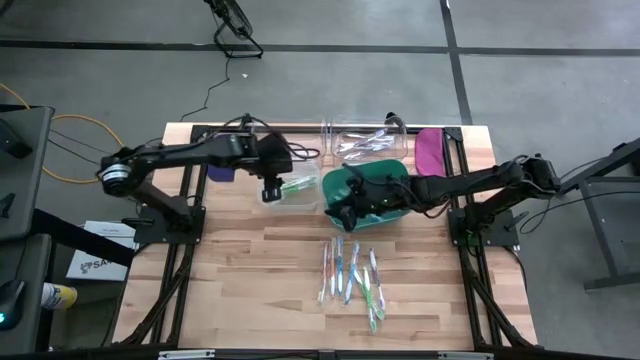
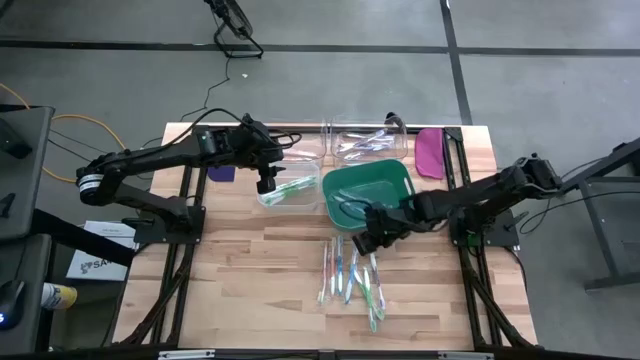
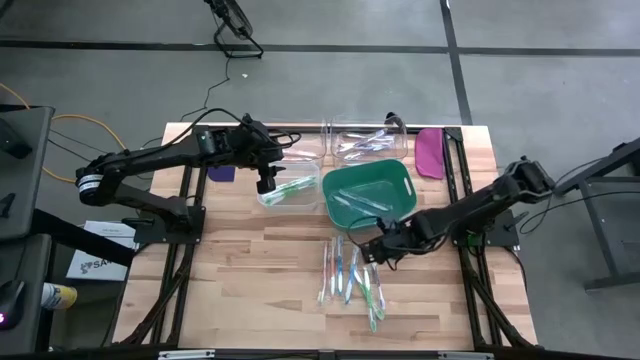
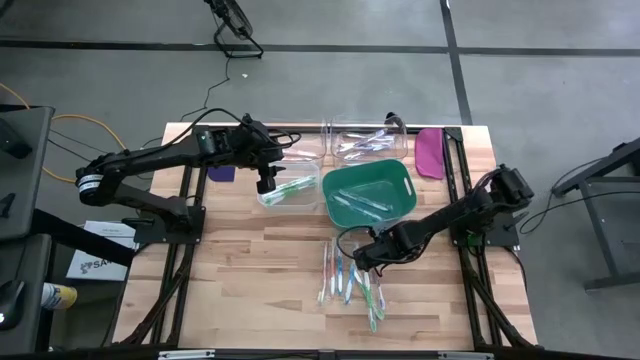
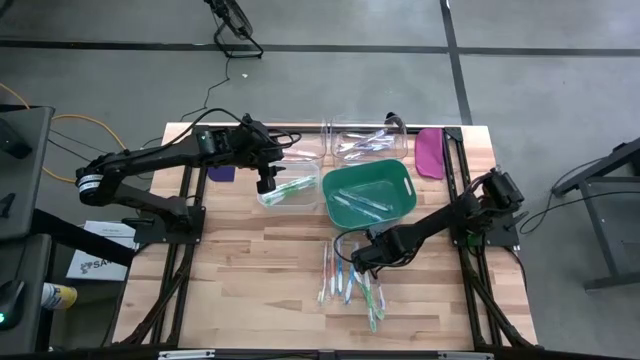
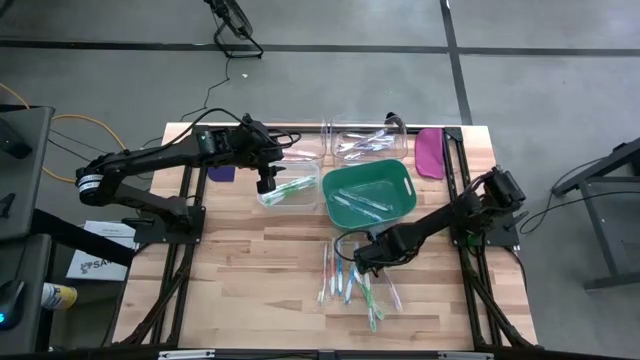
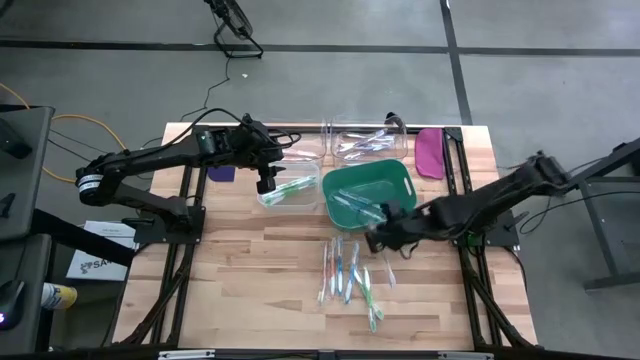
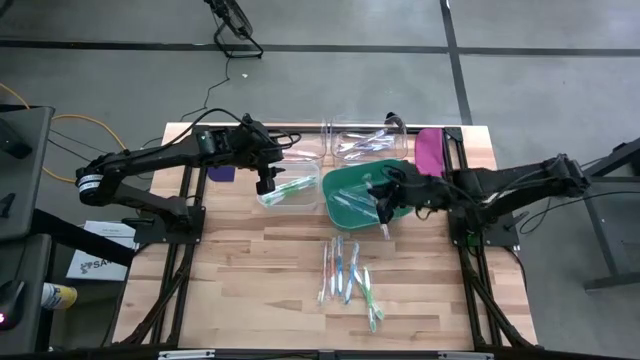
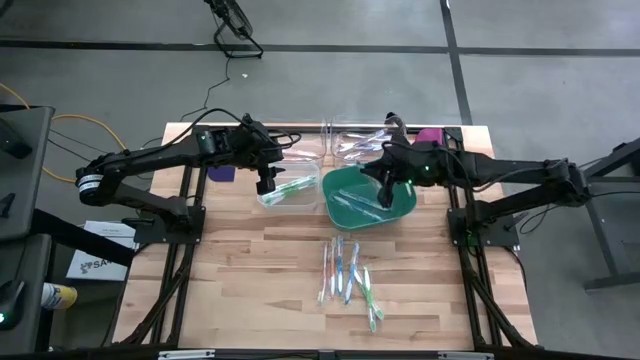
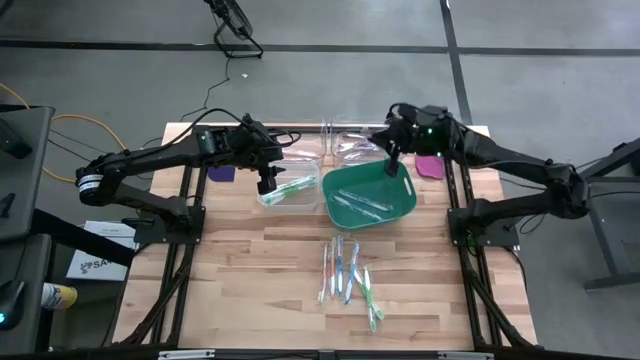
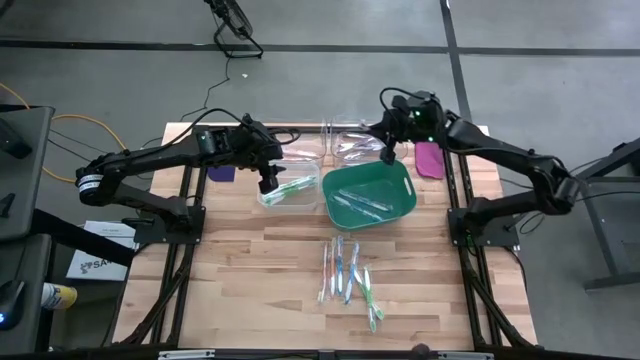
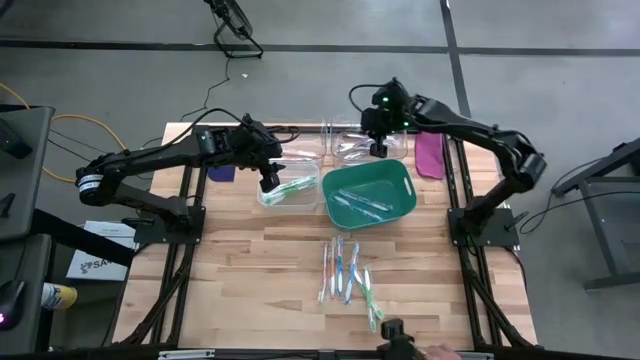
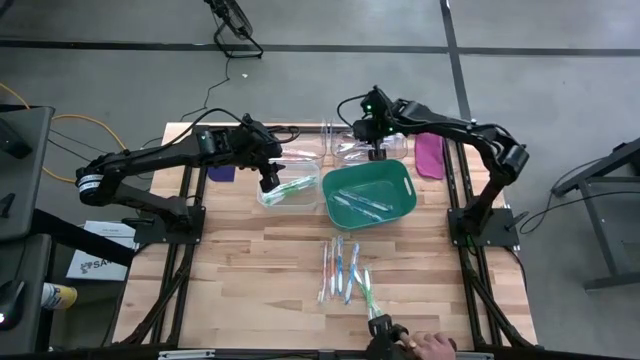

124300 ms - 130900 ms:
Task: Pick & Place Toothbrushes
Put the purple toothbrush into the right transparent bin

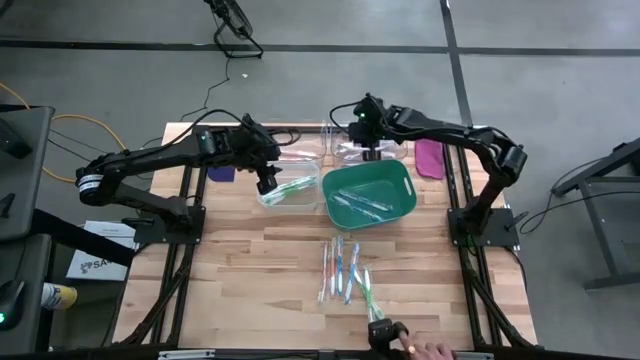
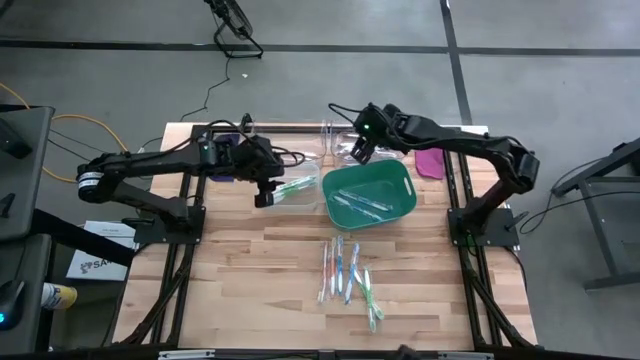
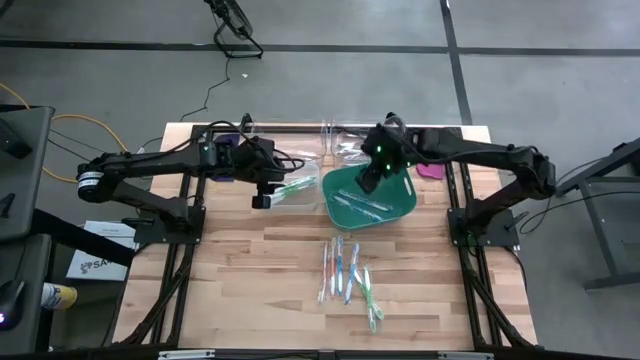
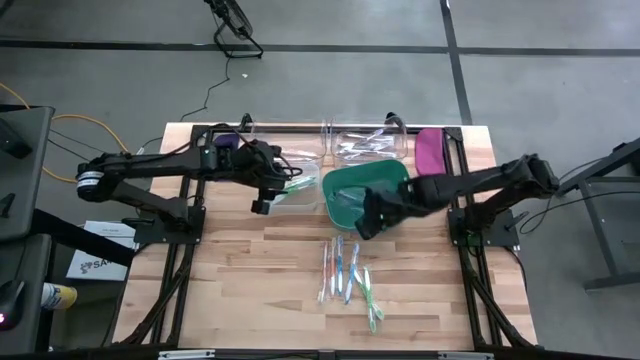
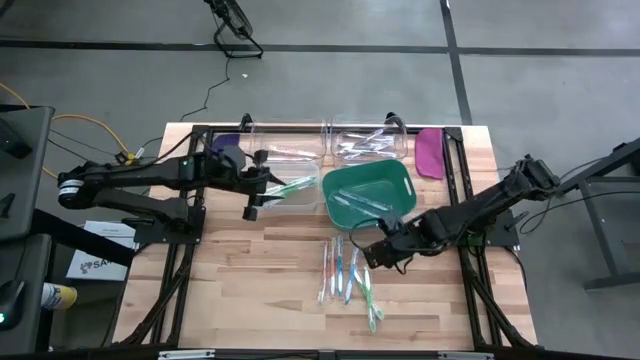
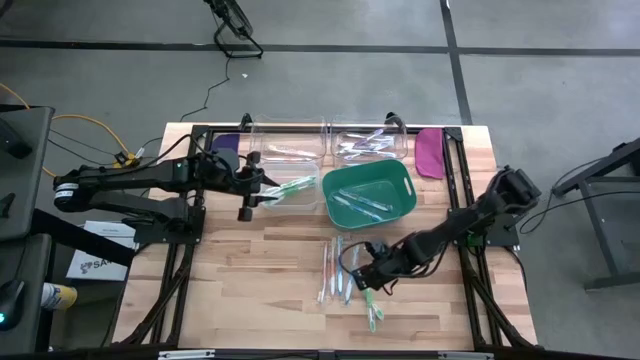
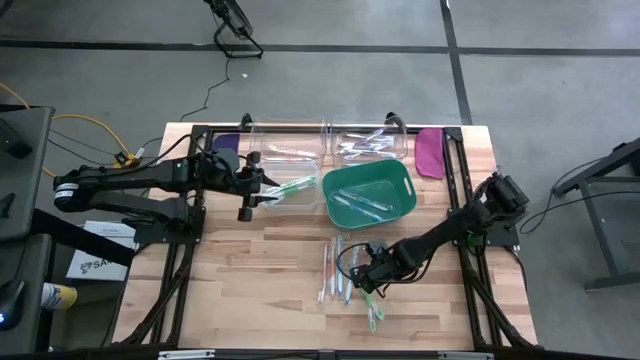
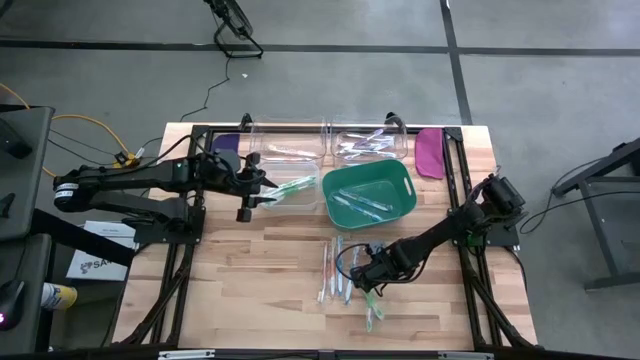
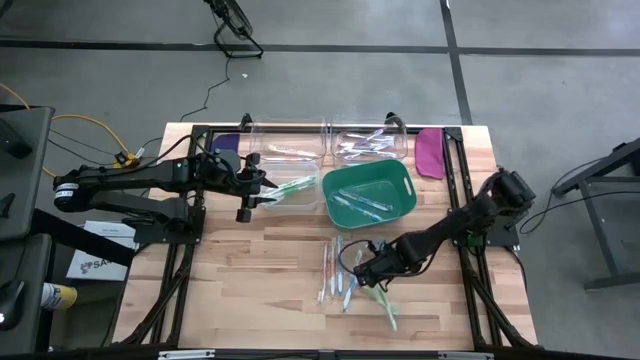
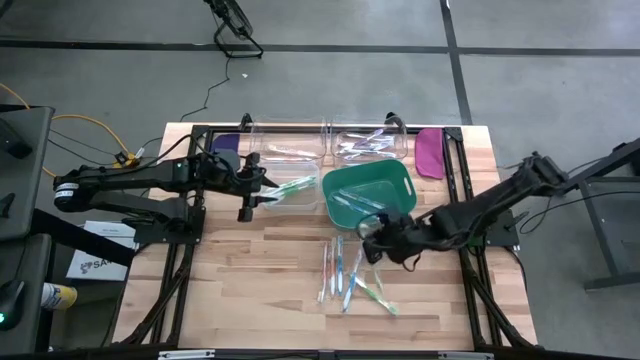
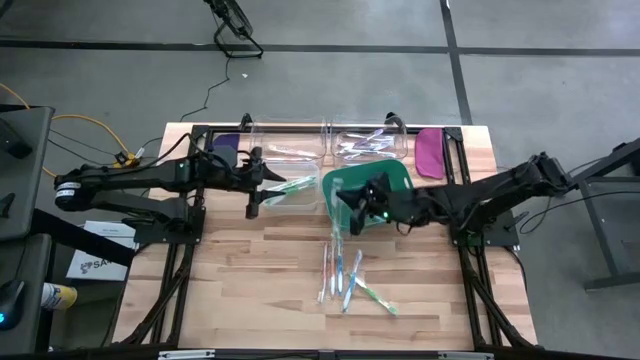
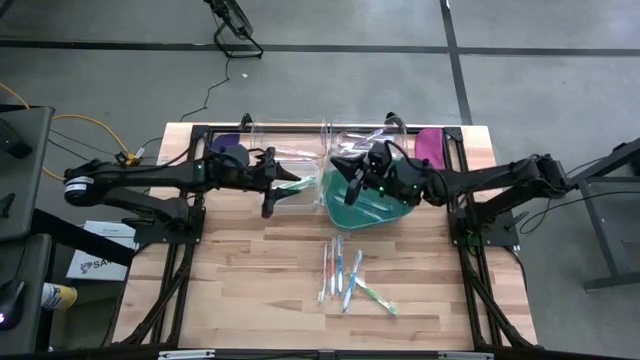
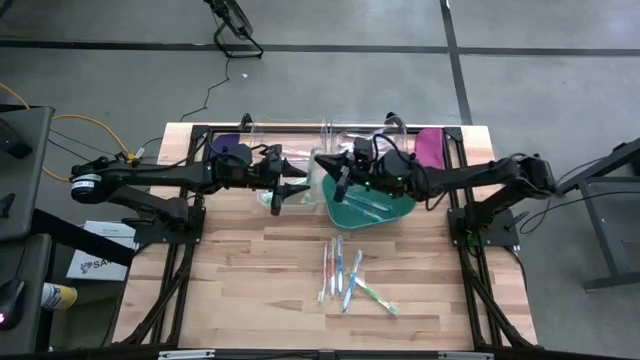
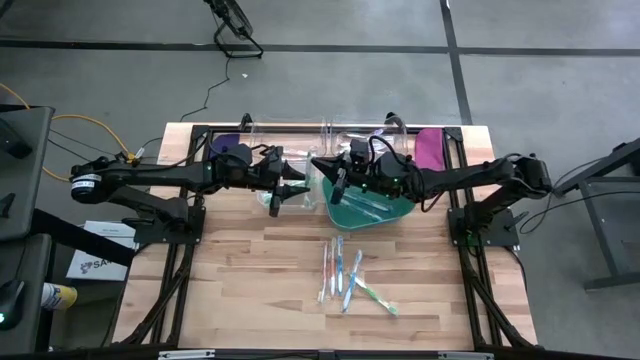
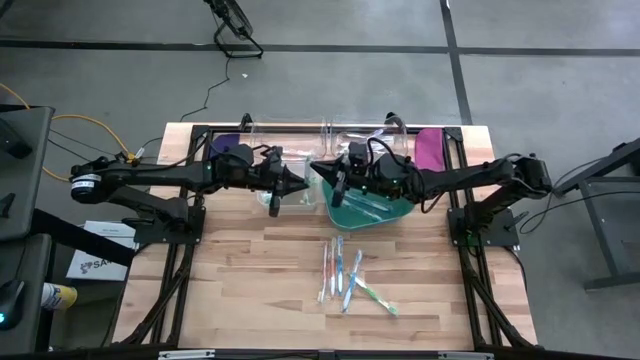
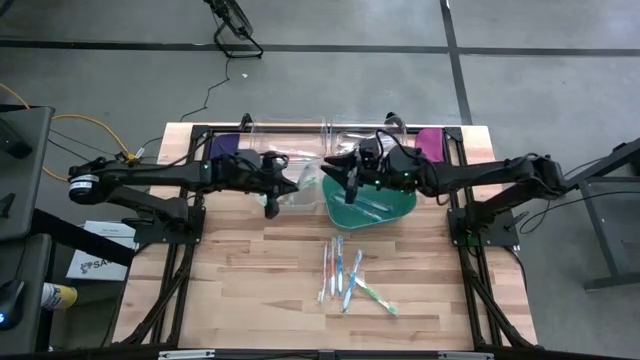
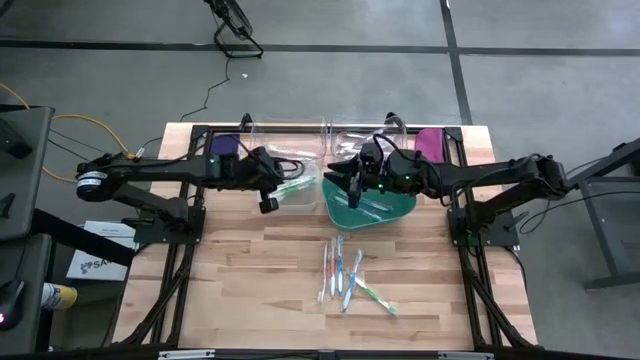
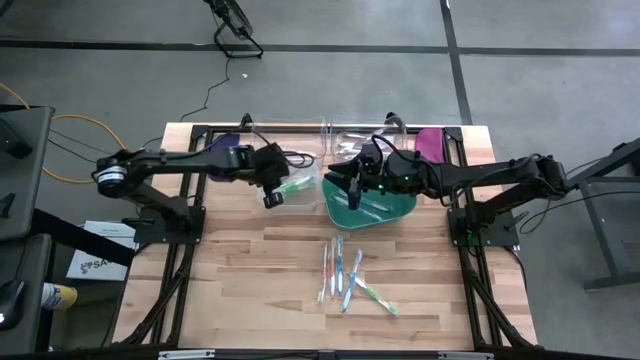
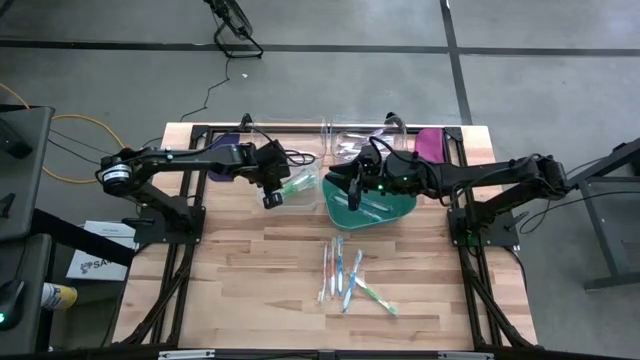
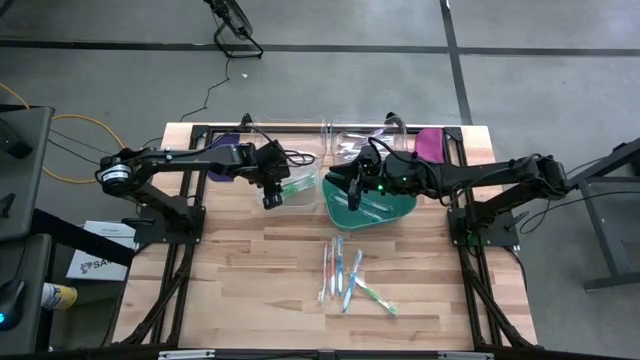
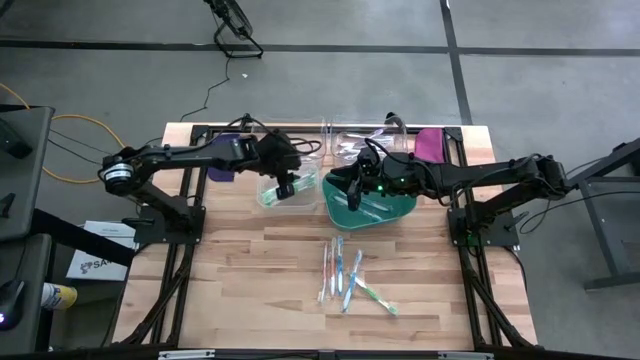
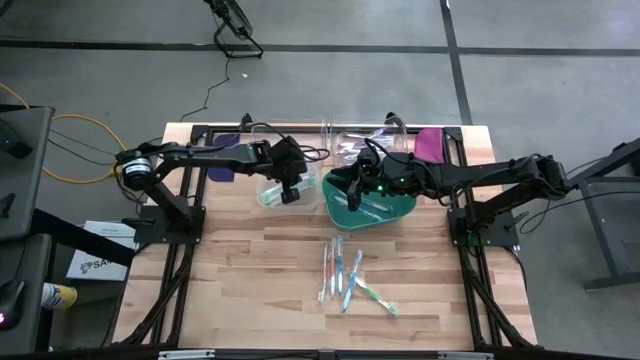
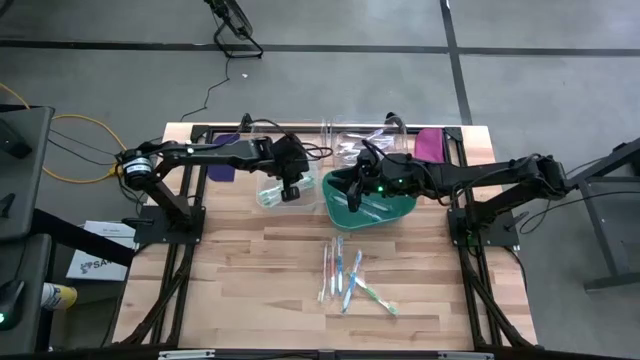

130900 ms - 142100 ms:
Put the green toothbrush into the white bin

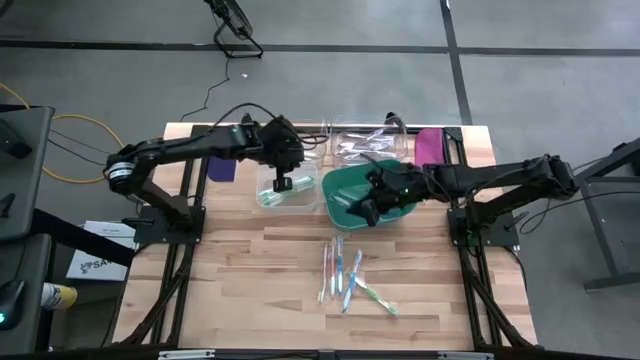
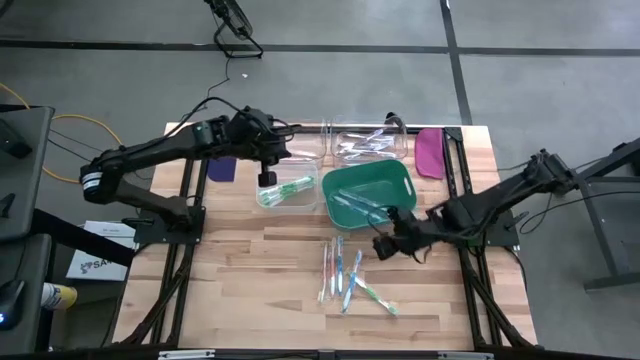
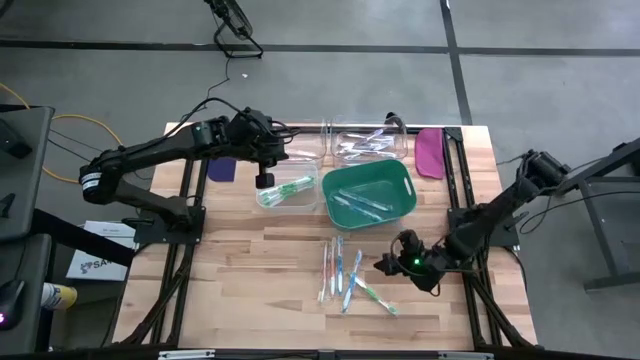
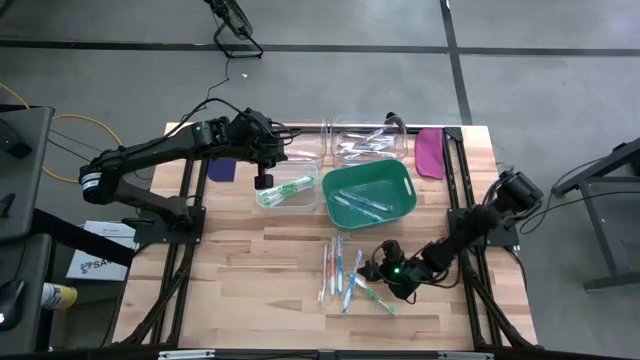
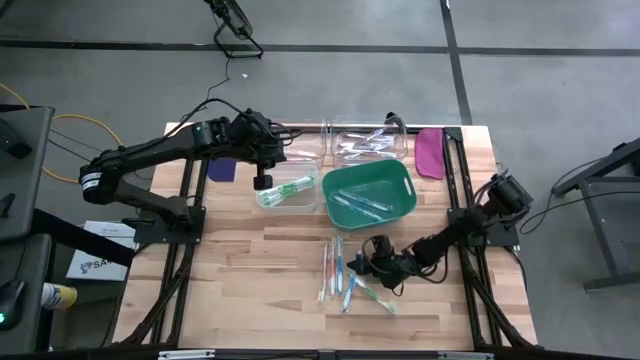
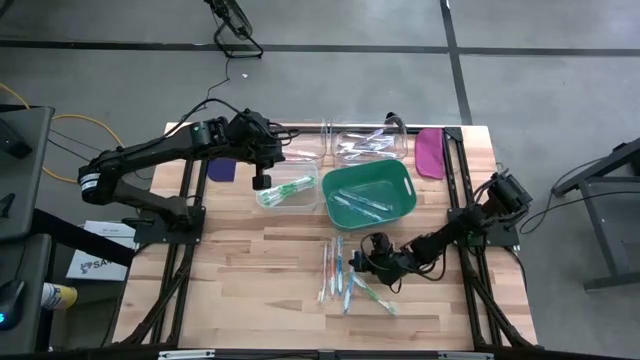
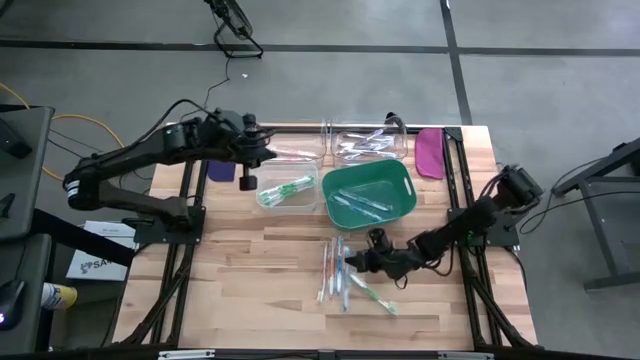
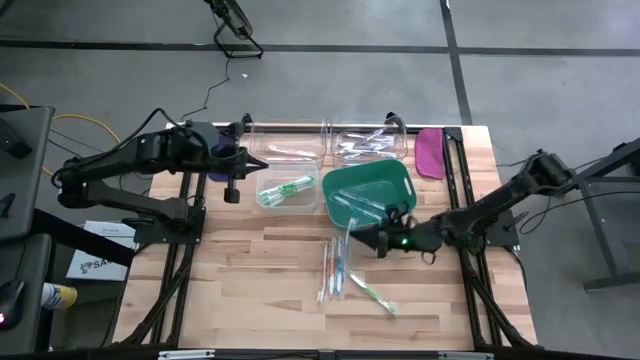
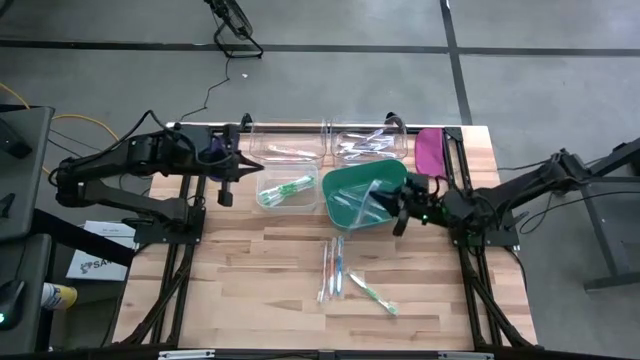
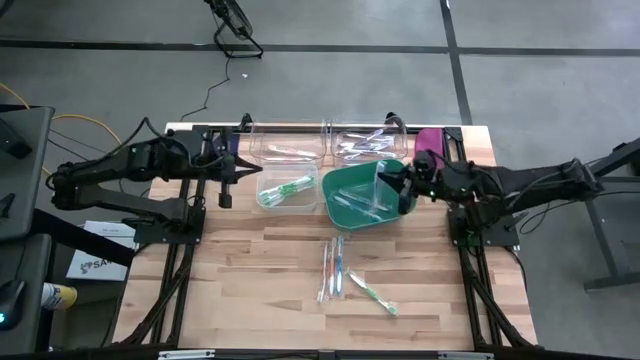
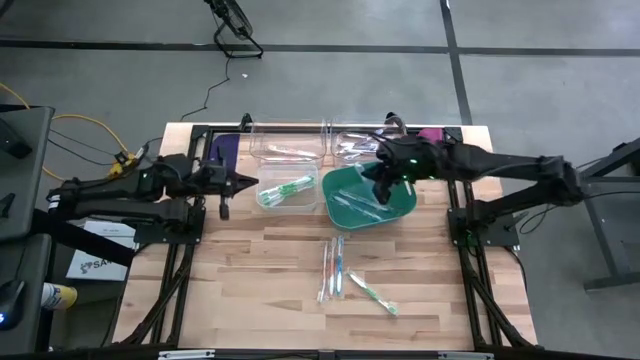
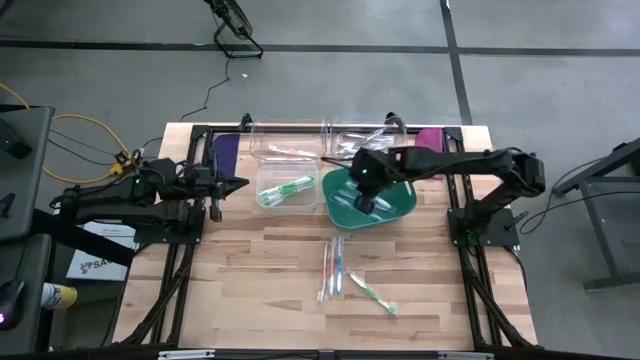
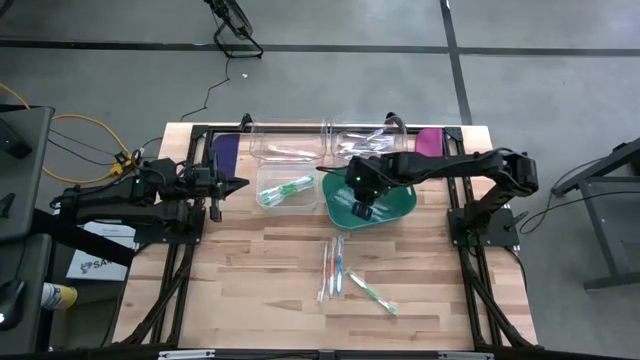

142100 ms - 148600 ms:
Put the blue toothbrush into the green bin
